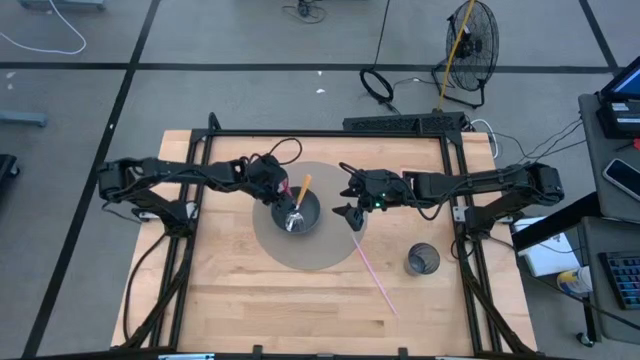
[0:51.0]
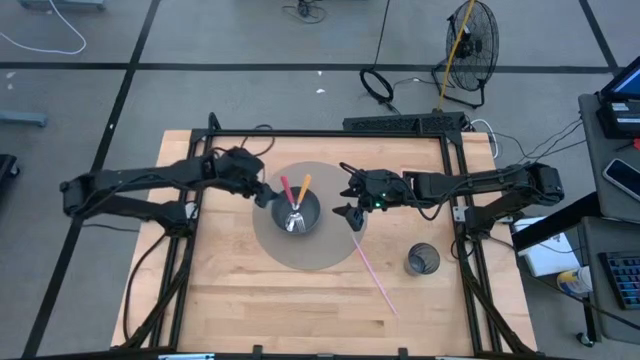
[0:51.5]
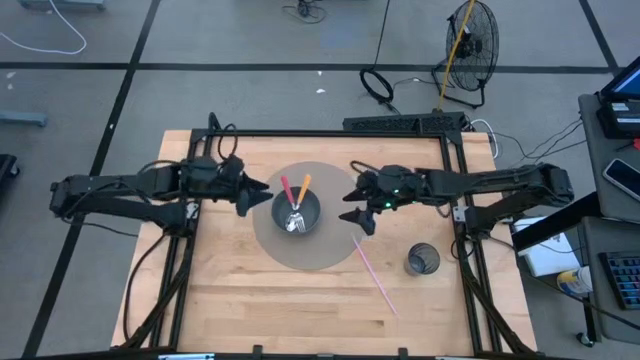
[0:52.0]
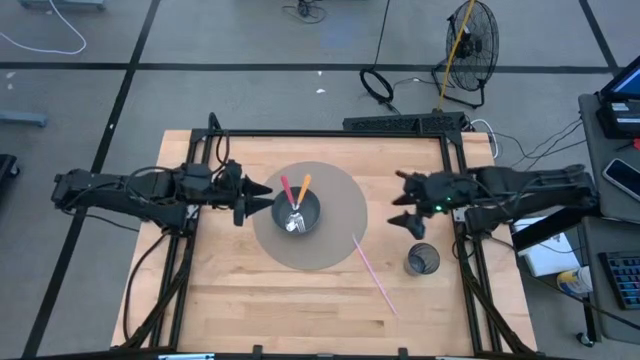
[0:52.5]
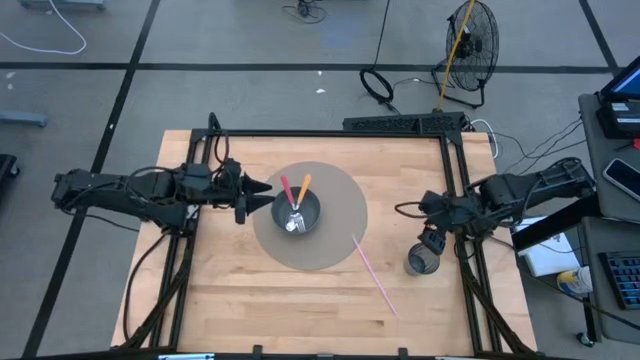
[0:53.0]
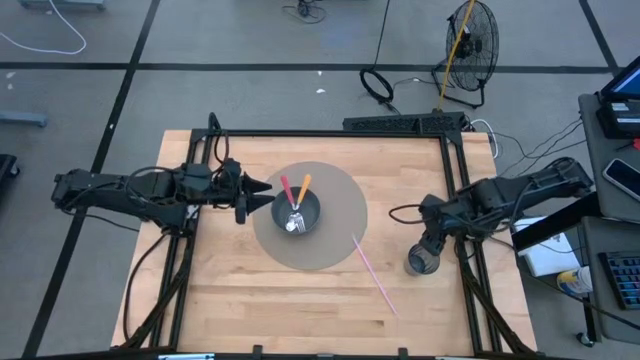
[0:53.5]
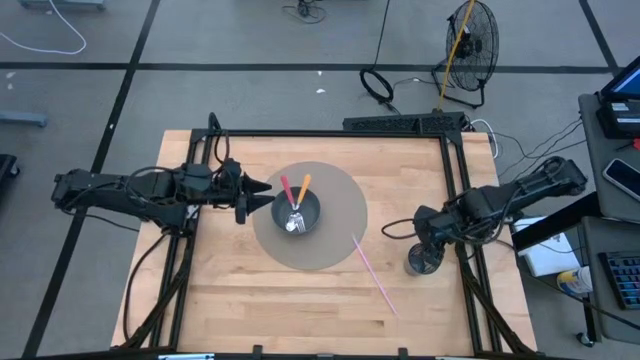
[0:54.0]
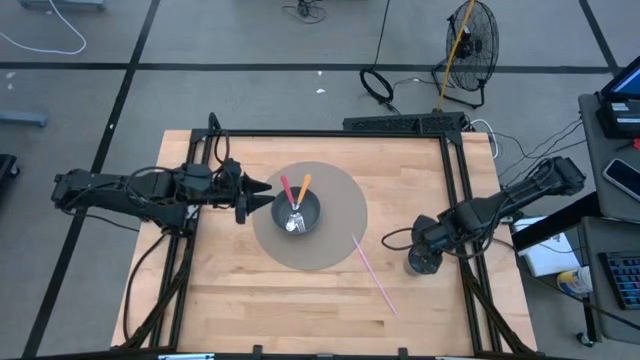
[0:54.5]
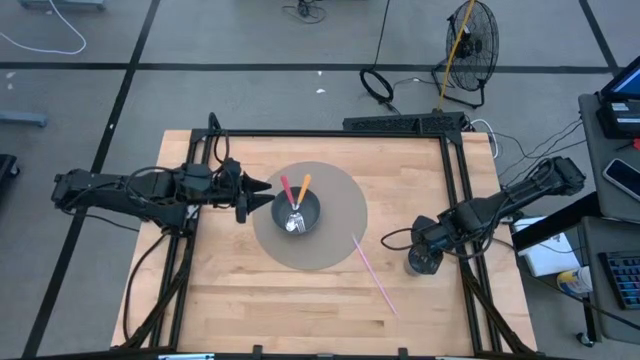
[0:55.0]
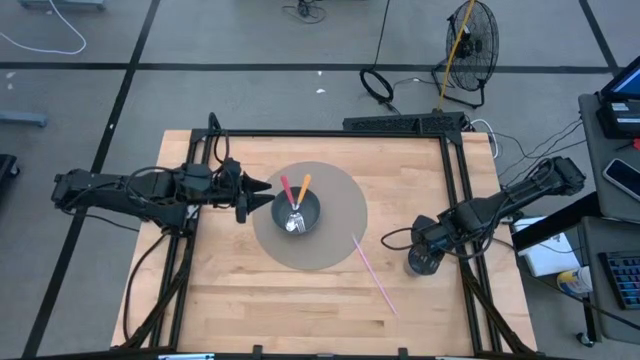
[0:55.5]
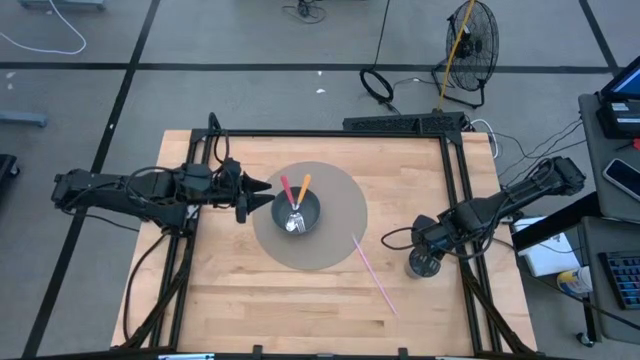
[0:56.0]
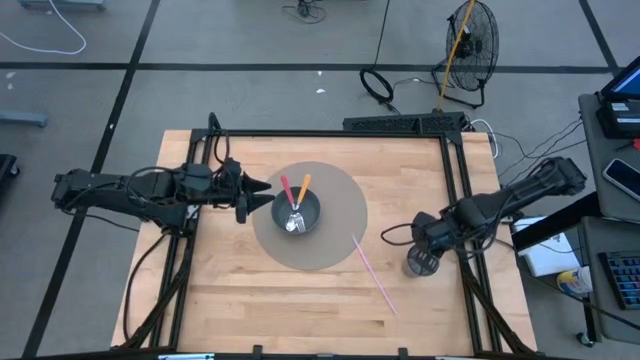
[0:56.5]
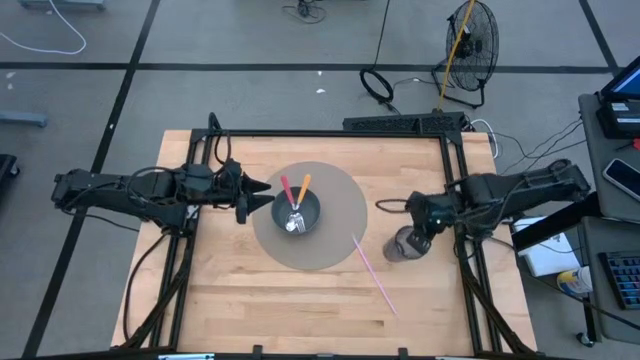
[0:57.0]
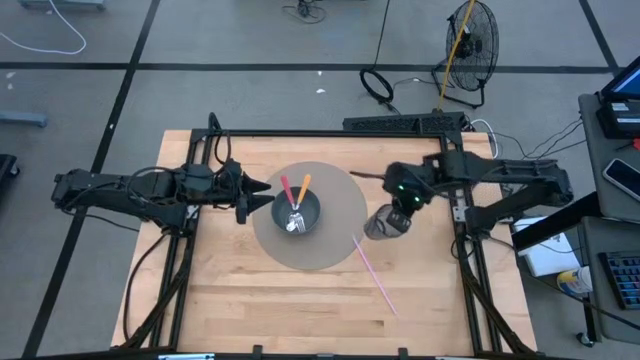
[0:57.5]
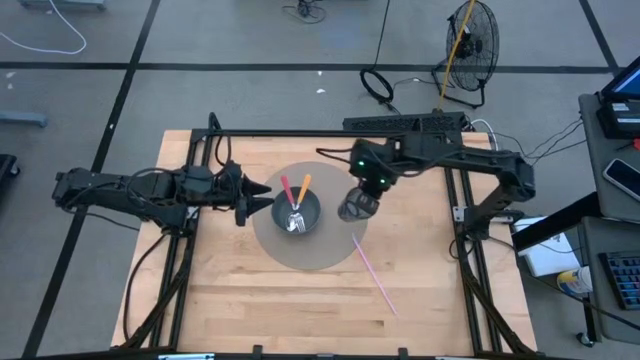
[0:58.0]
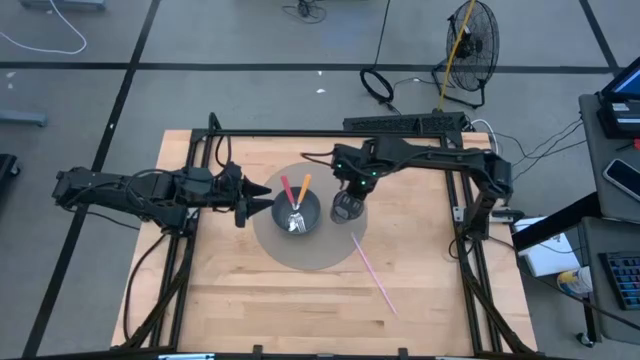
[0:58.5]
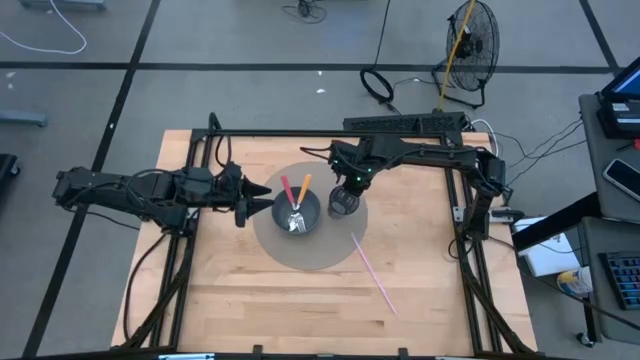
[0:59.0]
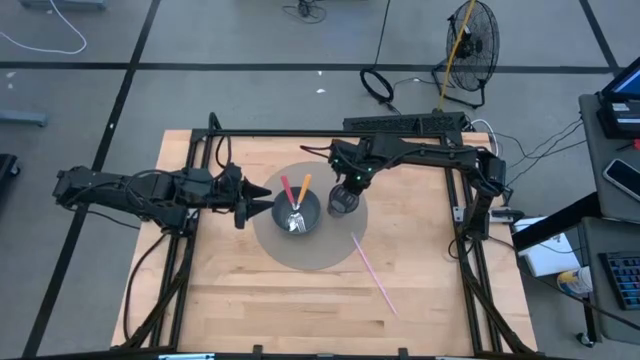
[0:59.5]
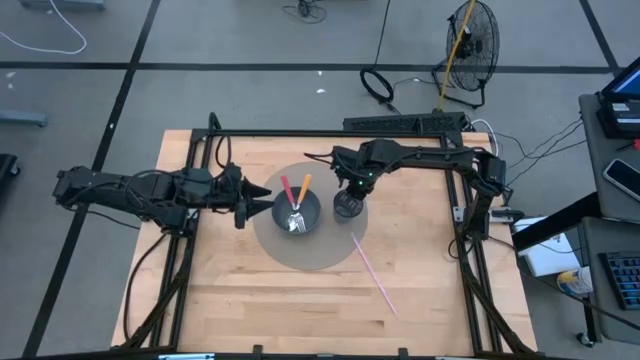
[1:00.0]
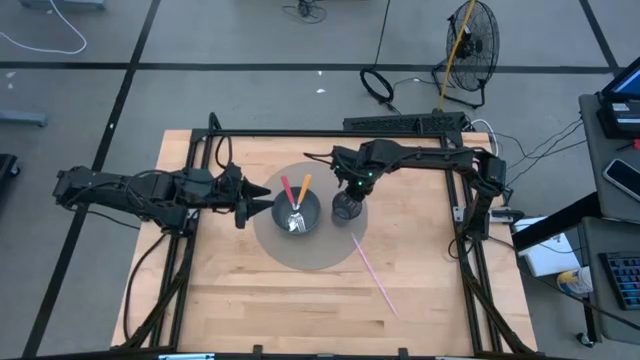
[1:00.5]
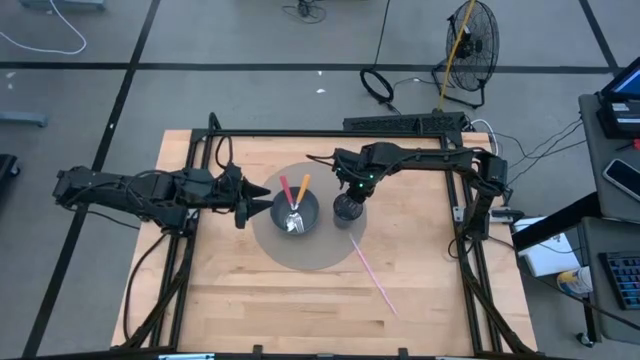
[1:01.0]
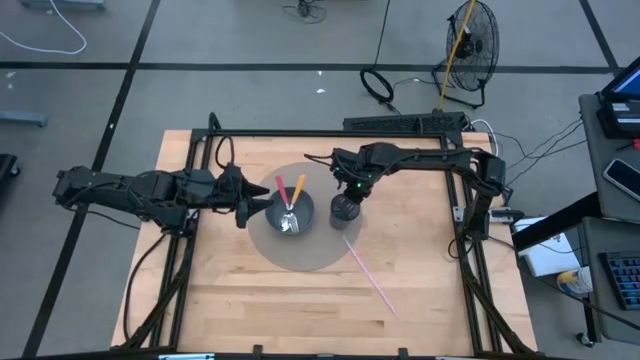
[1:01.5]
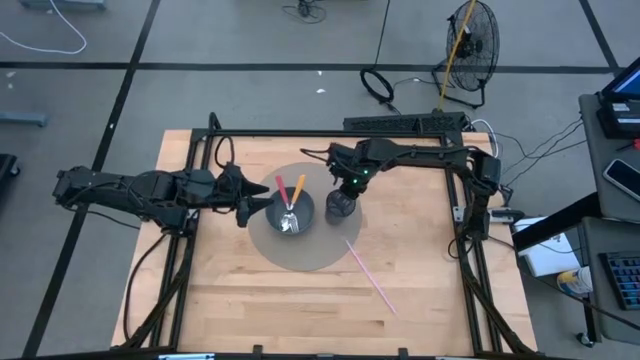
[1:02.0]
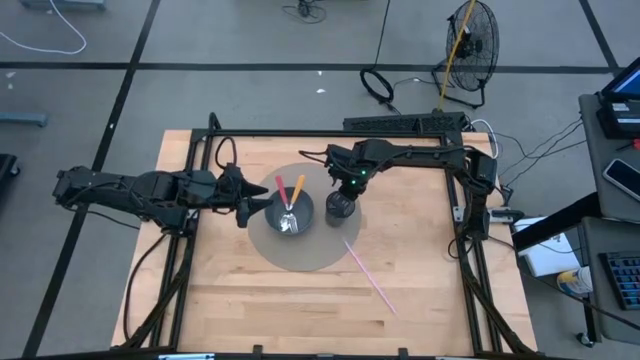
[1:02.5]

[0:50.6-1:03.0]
Task: Pick & Place Utensil
Put the blue cup on the mat to the right of the gray bowl

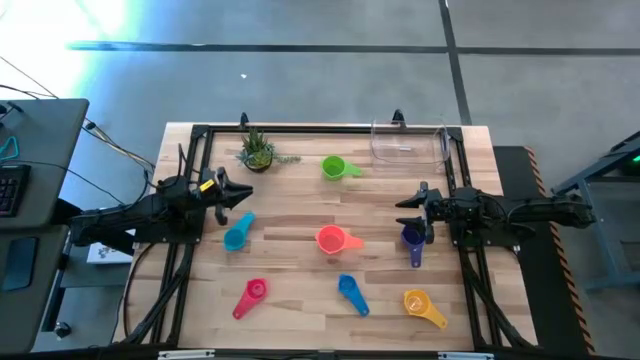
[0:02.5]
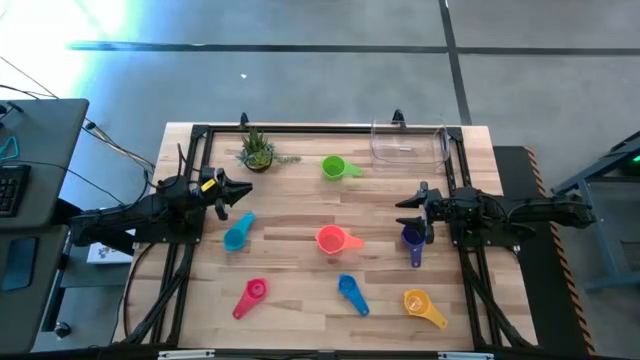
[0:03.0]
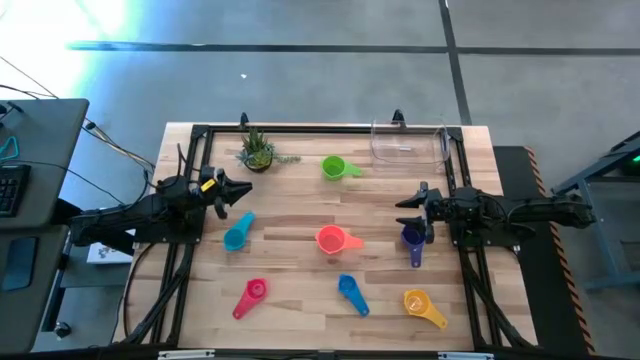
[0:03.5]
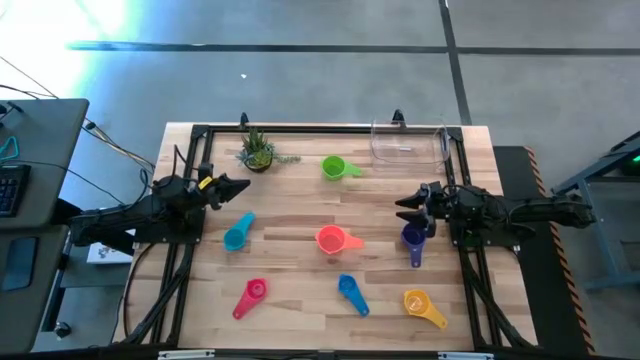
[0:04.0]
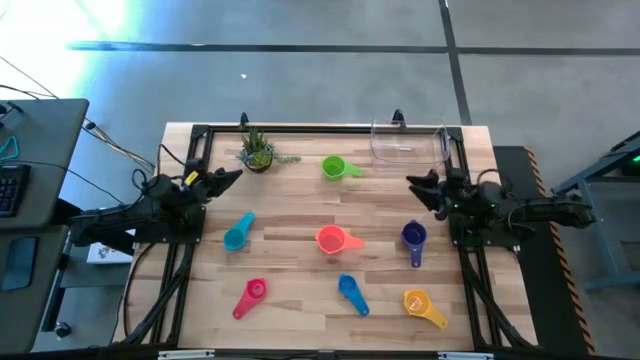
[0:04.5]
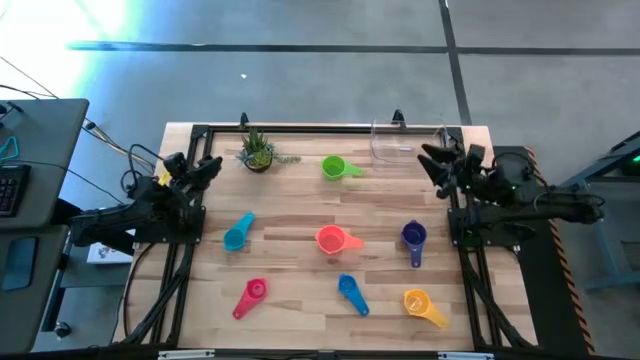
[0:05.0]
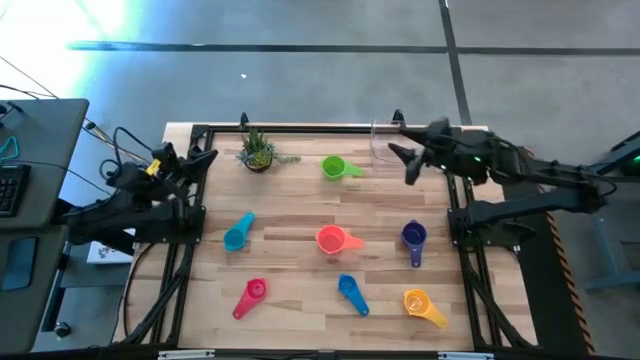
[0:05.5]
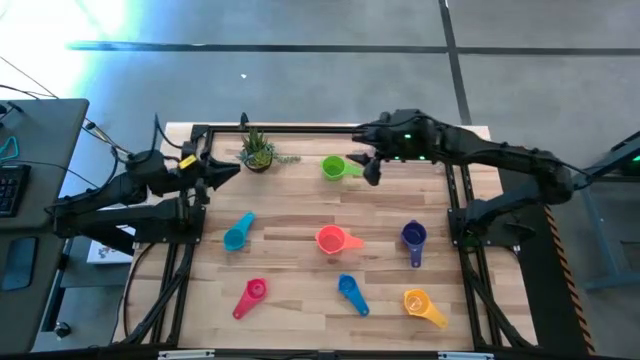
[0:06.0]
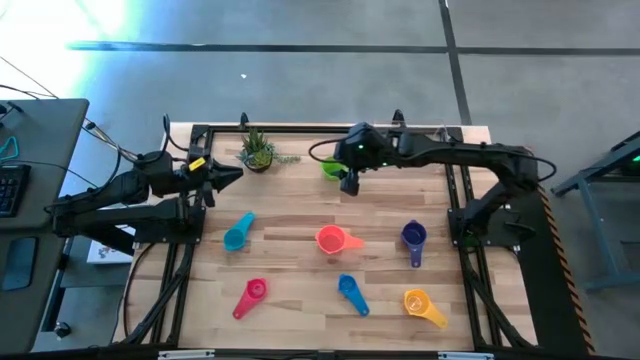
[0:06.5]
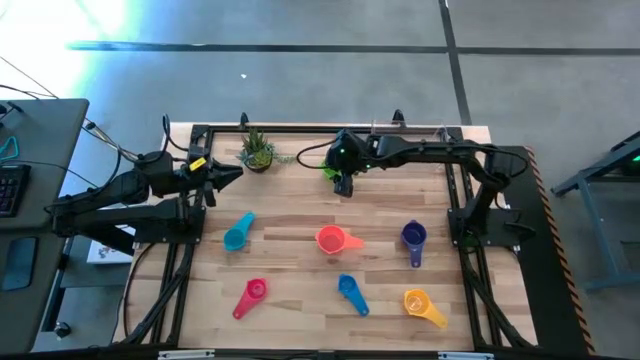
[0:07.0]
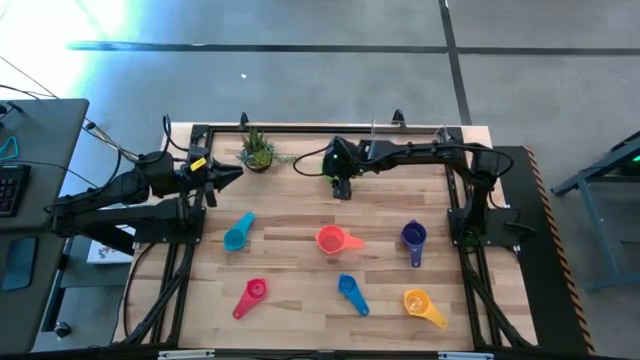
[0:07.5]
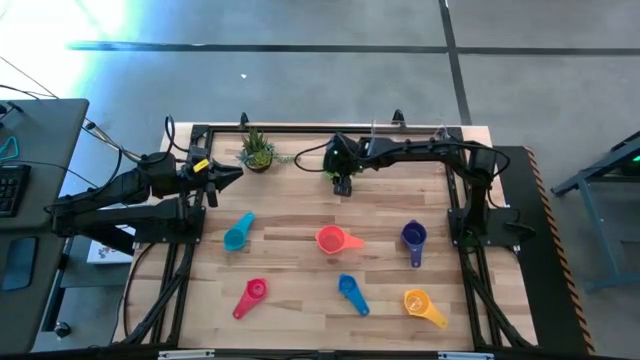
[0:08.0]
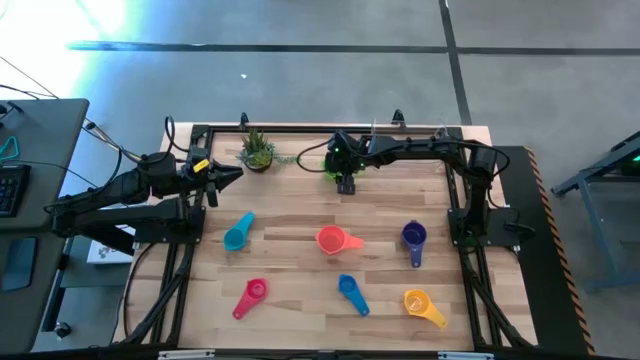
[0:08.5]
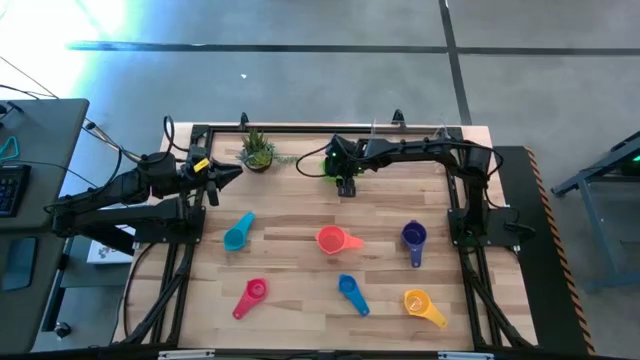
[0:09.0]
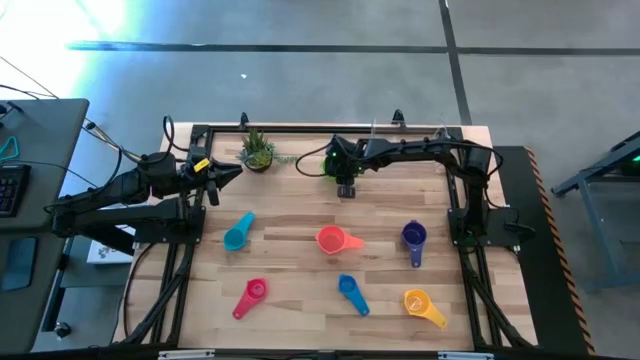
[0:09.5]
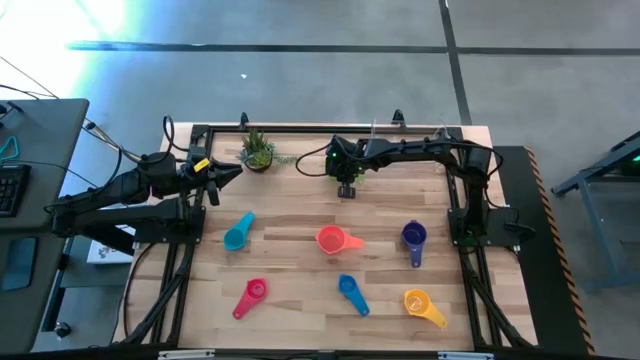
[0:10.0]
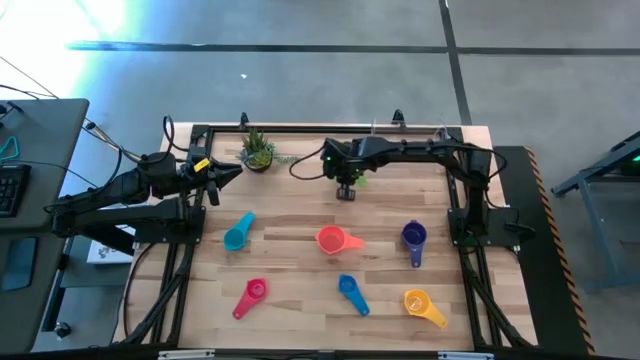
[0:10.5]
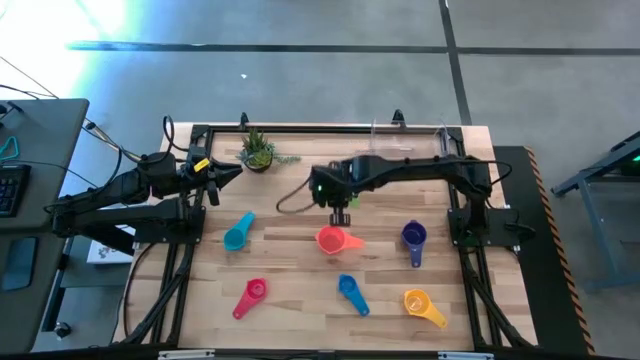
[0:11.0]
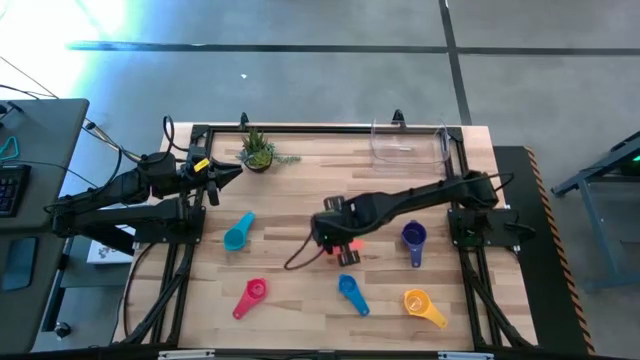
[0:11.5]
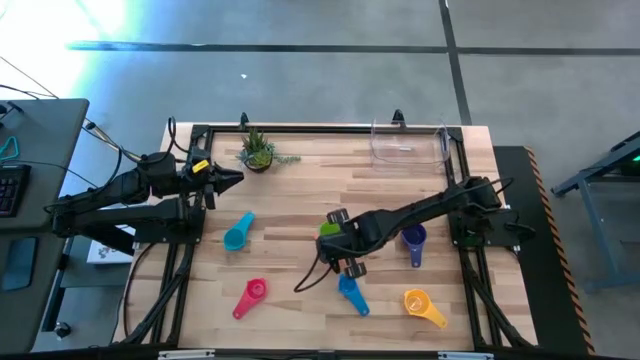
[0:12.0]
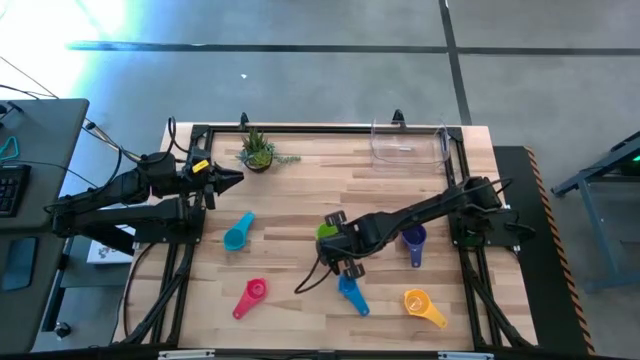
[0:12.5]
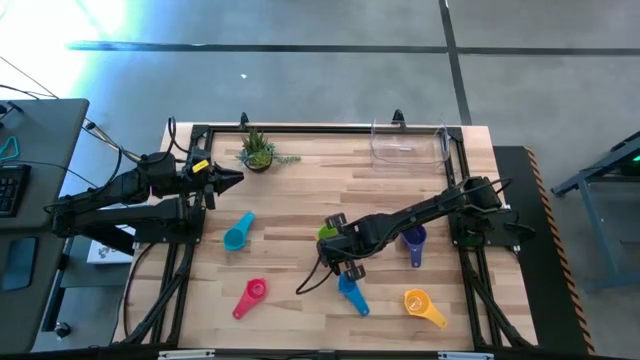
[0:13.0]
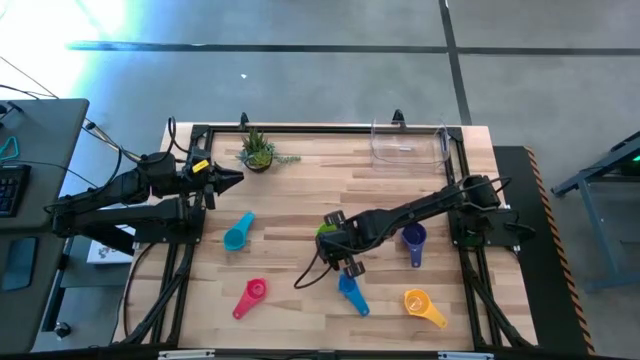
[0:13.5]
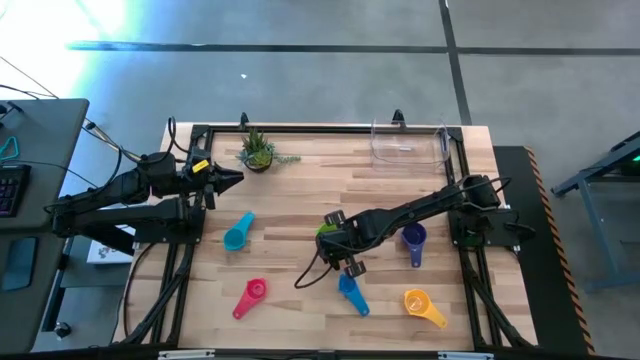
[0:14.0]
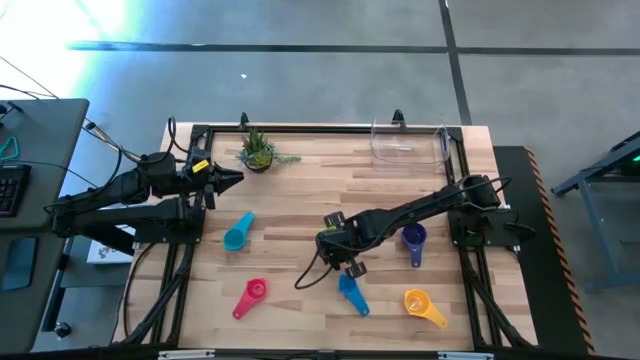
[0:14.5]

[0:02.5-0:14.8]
Task: Nest measuring cups in basket
Stack the light green measuring cup on top of the orange measuring cup
